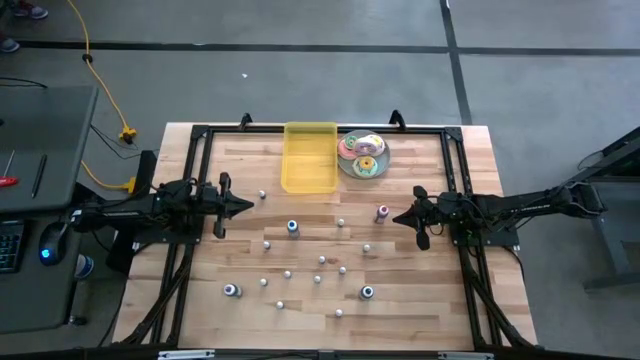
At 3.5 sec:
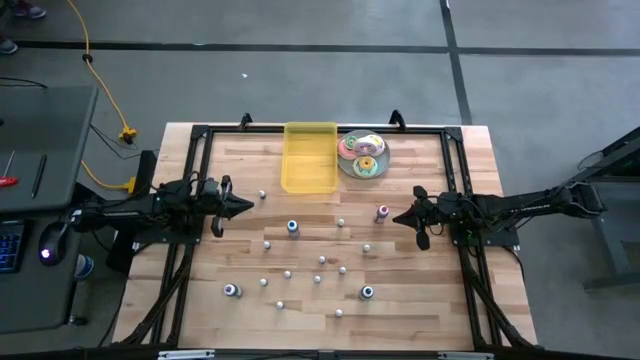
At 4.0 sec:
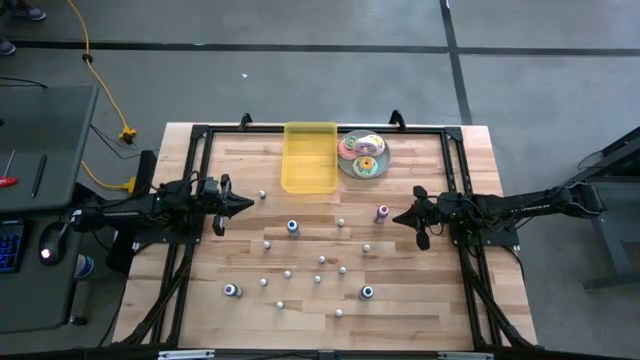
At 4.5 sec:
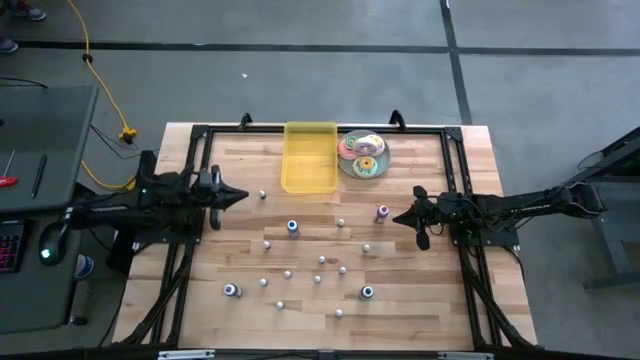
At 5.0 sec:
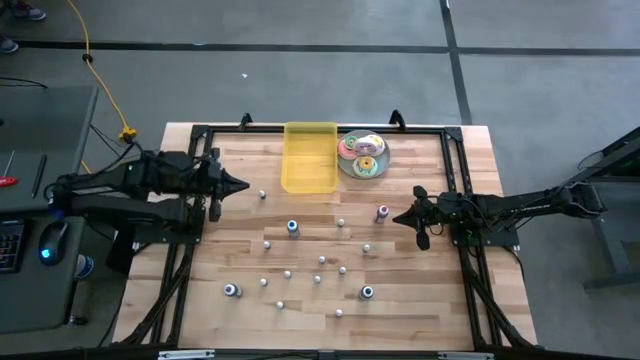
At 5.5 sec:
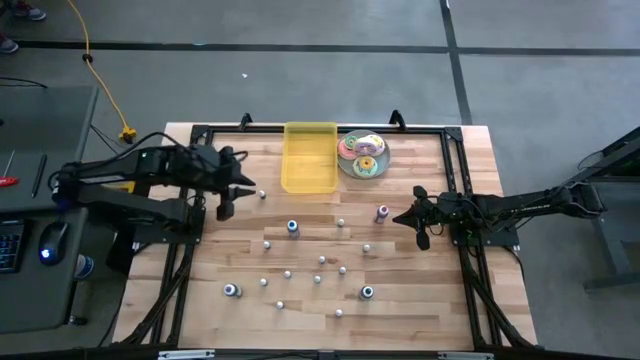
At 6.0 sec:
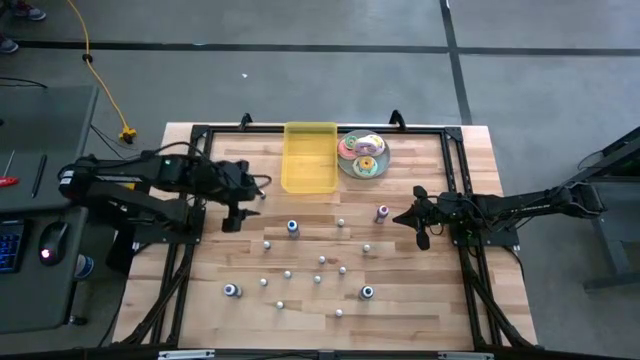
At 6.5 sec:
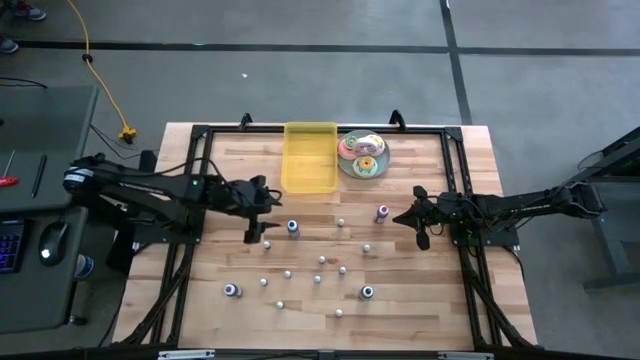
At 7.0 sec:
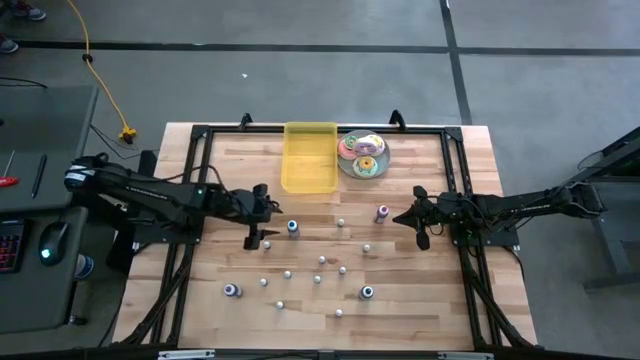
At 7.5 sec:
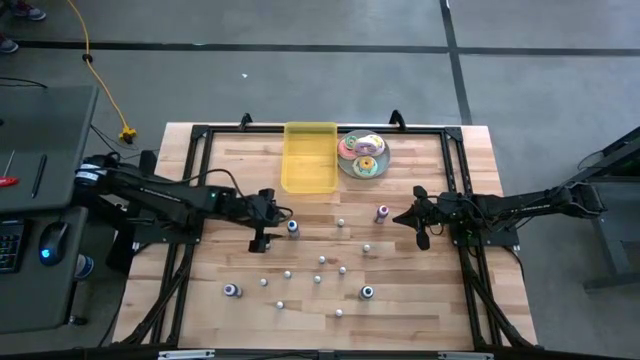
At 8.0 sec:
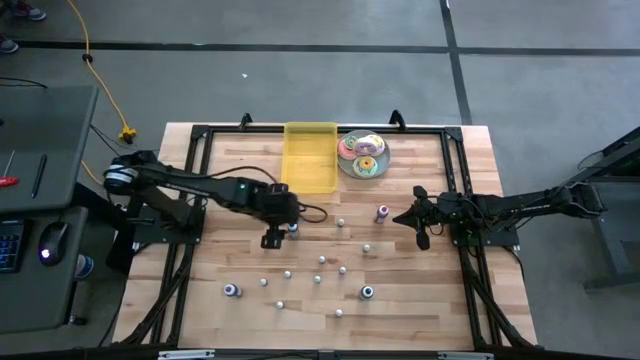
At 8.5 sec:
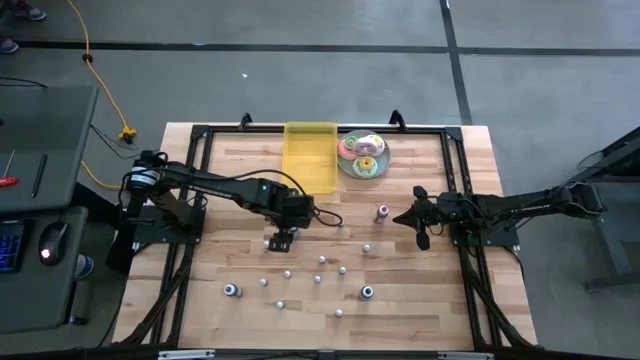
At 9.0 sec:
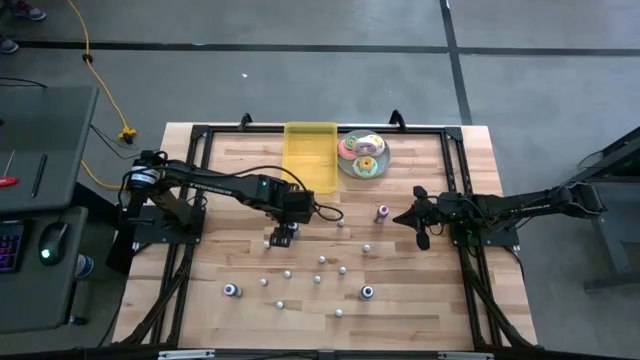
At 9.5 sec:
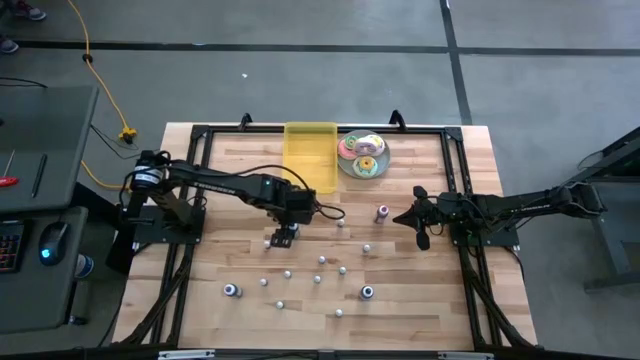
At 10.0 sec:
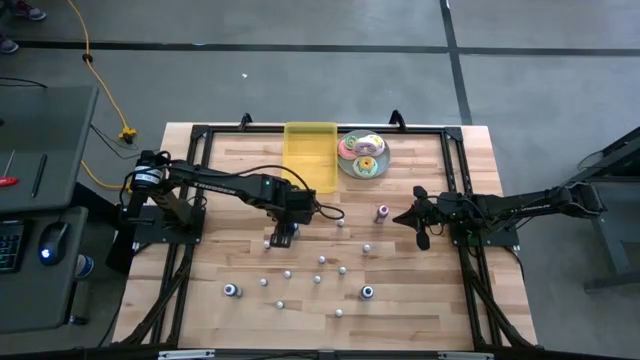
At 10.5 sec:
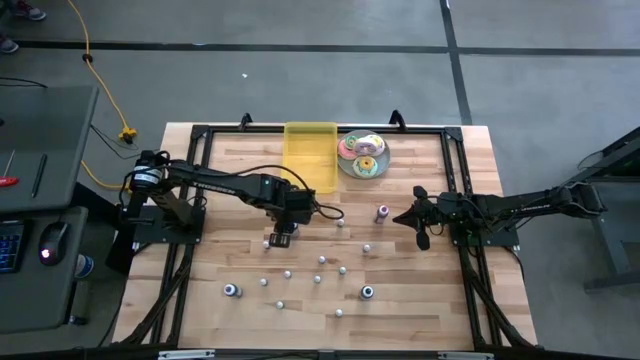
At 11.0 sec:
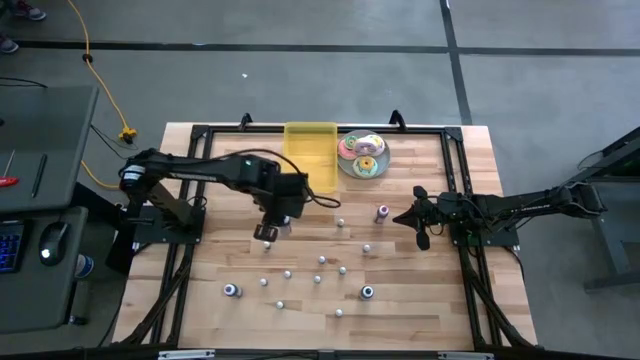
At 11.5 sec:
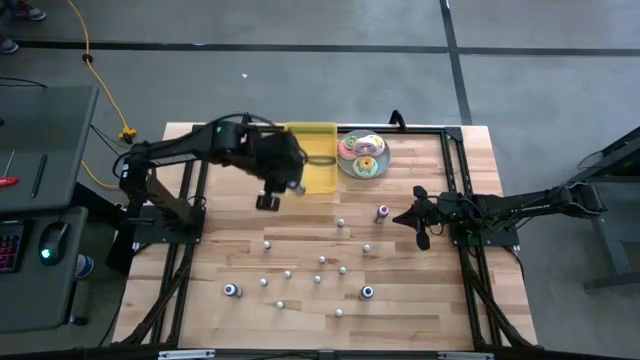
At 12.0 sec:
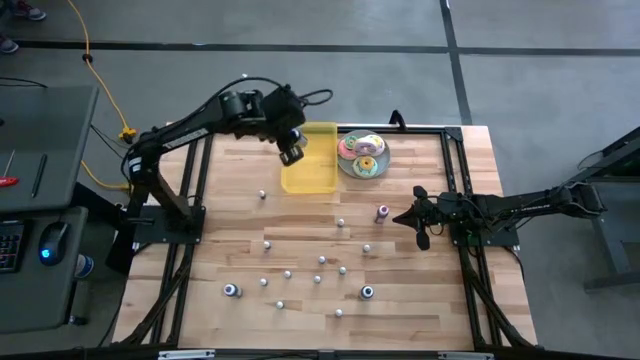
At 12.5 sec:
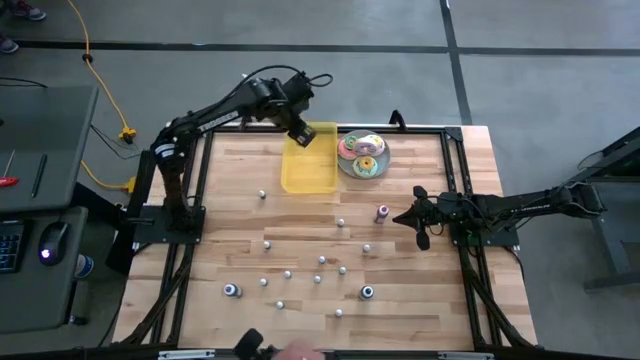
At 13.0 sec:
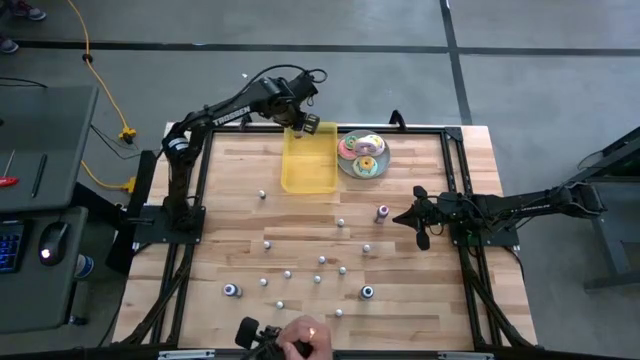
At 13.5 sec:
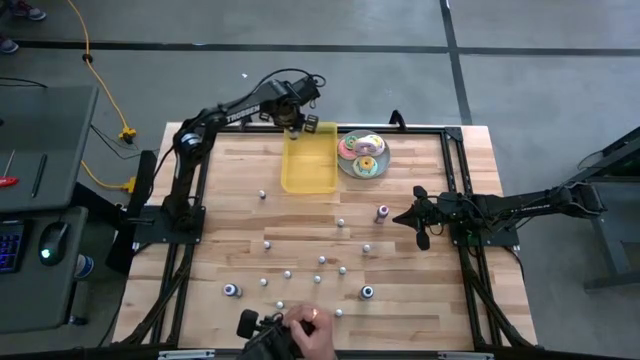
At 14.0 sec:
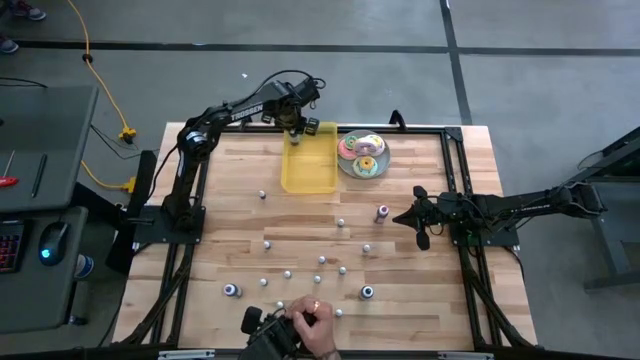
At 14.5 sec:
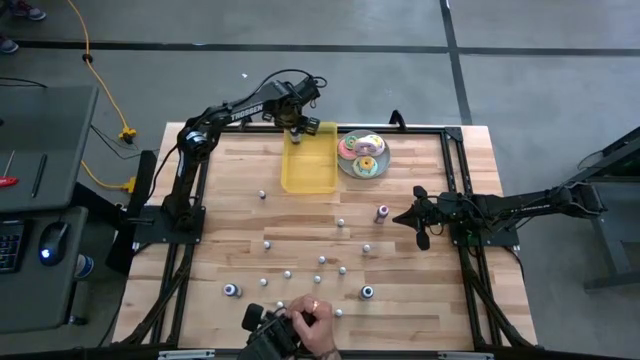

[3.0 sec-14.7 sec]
Task: Pick & Place food coloring
Put the big blue food coloring bottle into the bin

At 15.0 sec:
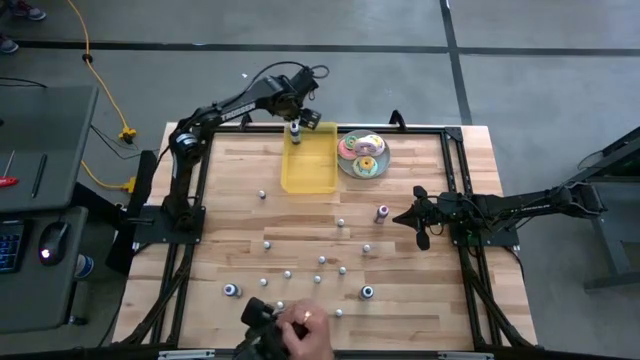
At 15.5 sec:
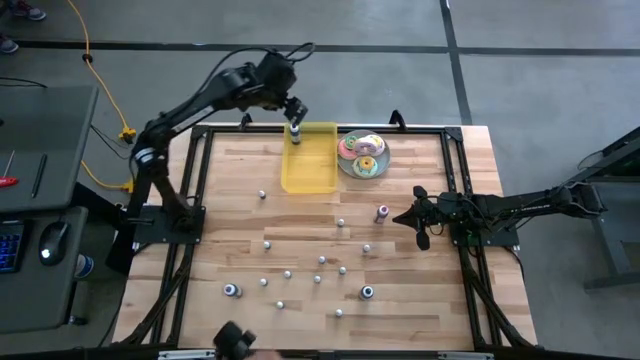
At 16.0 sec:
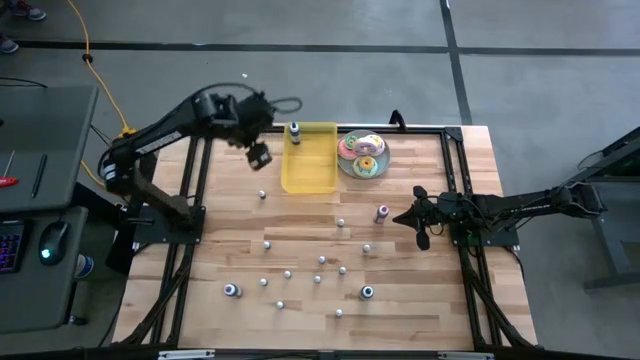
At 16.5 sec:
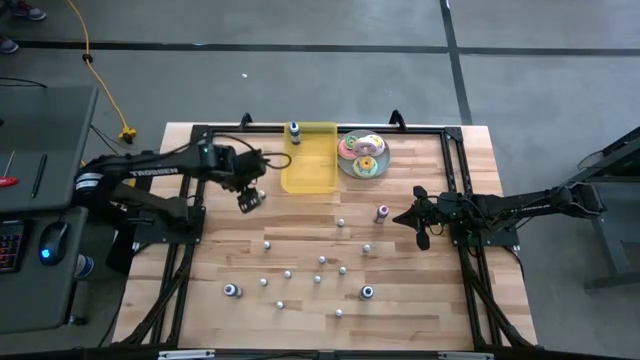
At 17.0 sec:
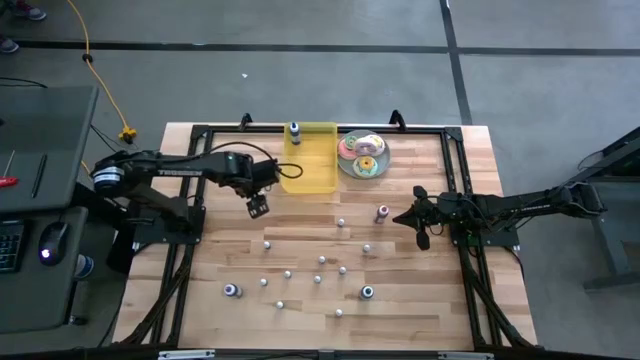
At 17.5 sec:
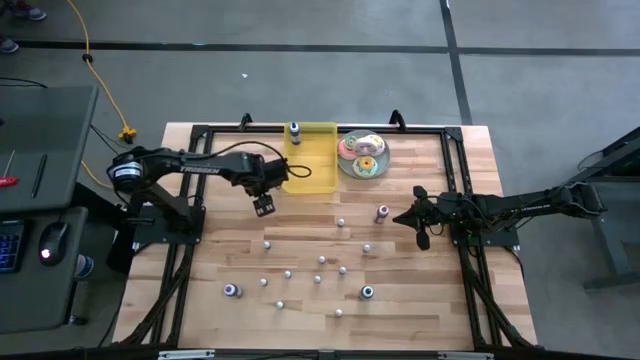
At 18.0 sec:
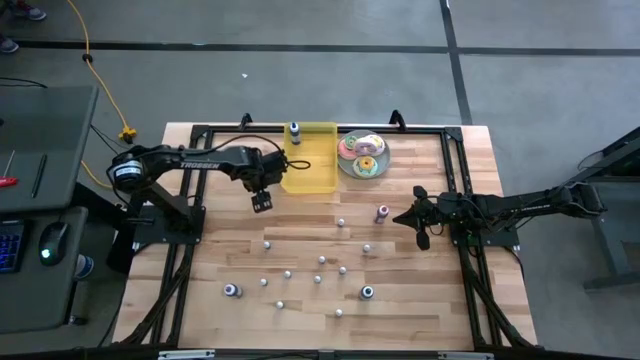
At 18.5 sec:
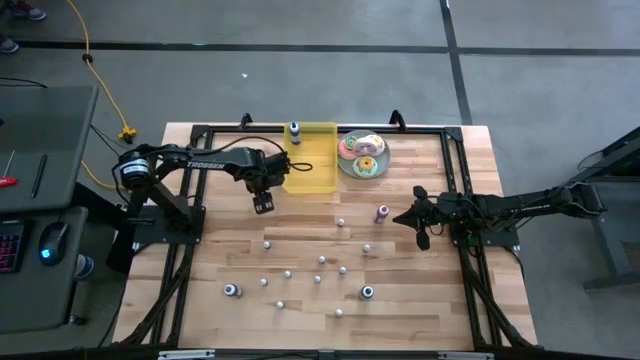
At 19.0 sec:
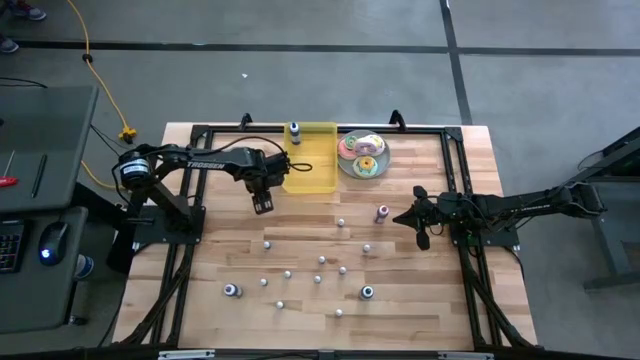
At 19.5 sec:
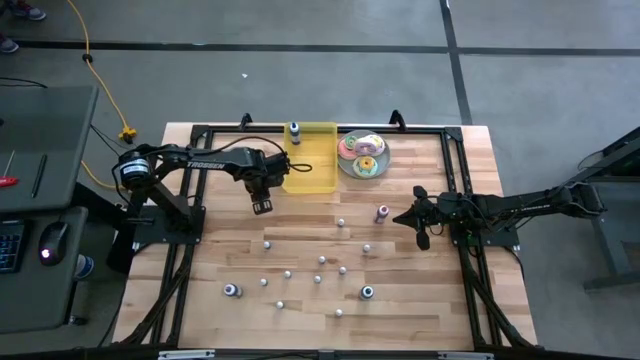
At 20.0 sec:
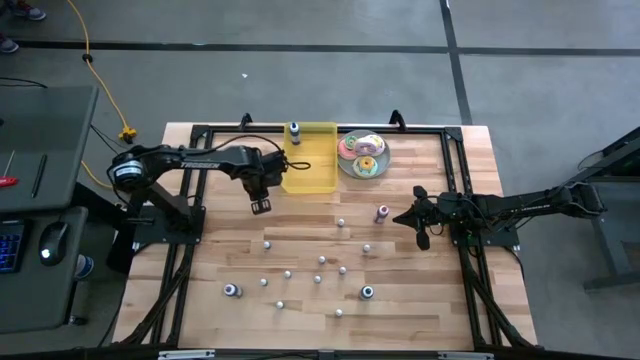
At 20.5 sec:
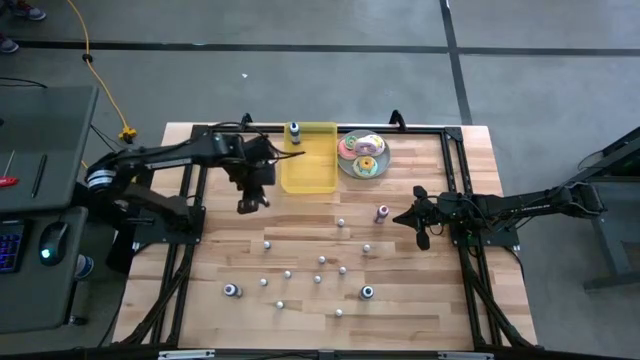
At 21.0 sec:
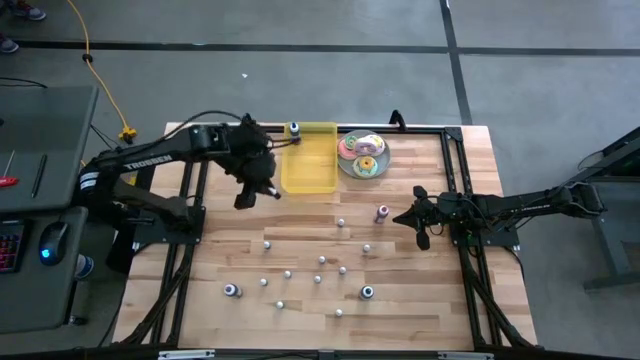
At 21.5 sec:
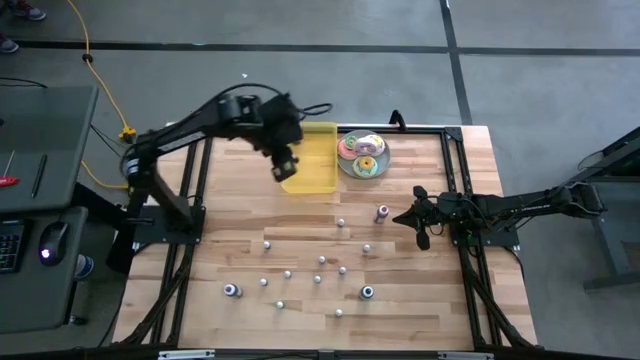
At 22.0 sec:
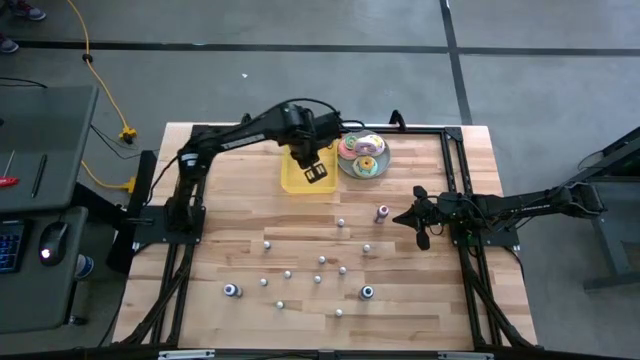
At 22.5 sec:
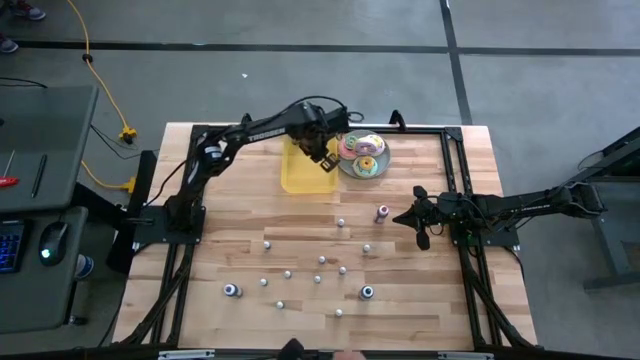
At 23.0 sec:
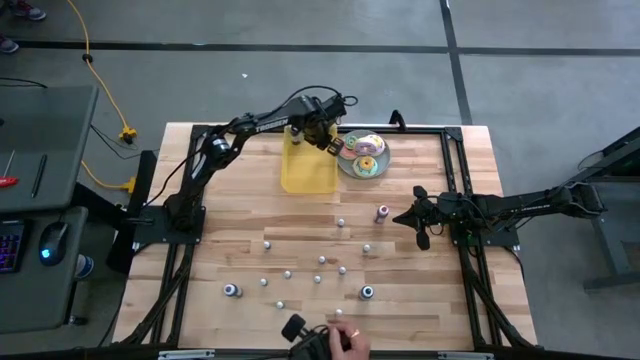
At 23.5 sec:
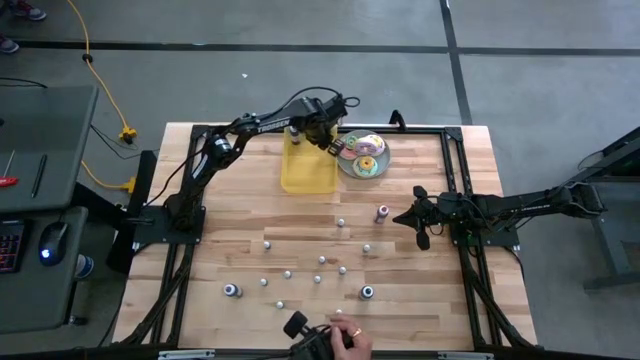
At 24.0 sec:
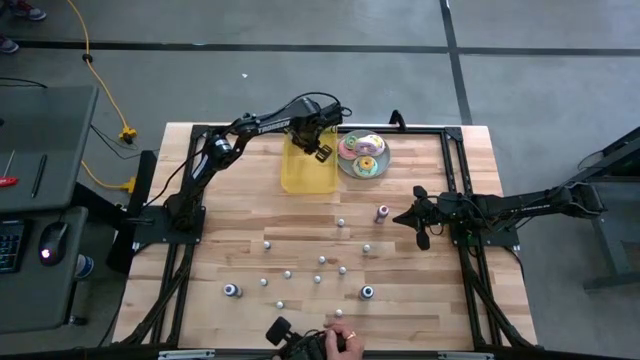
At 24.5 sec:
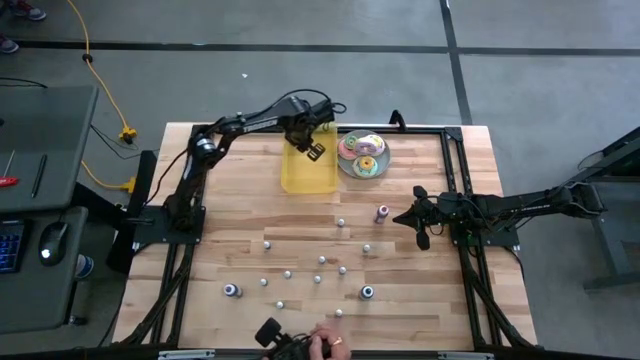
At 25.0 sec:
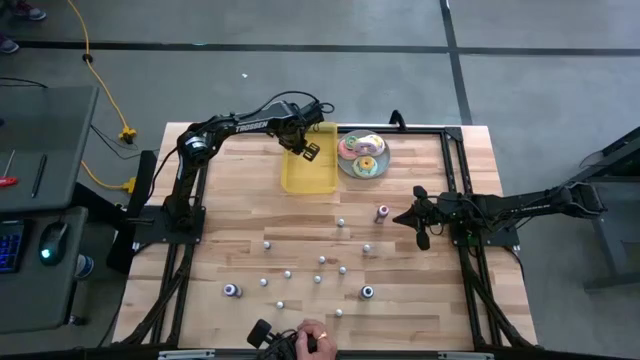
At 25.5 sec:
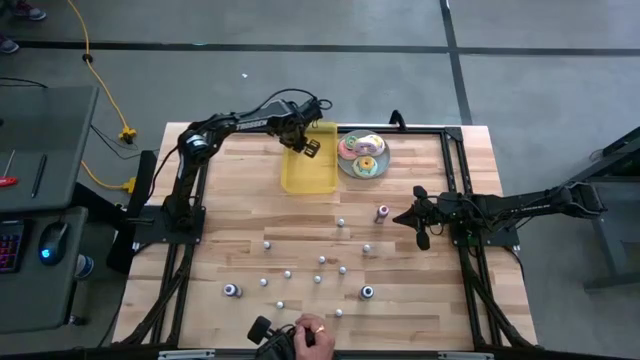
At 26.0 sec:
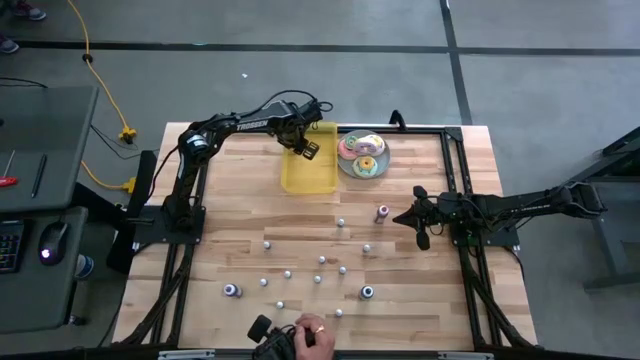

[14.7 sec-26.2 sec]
Put the small green food coloring bottle into the bin
